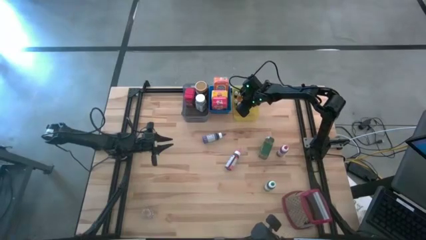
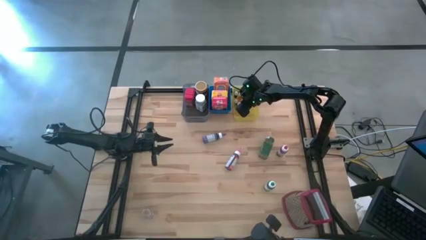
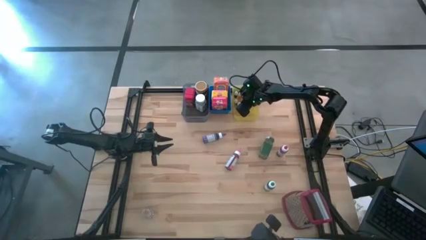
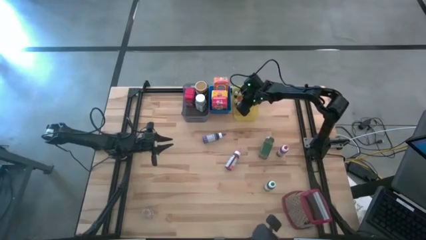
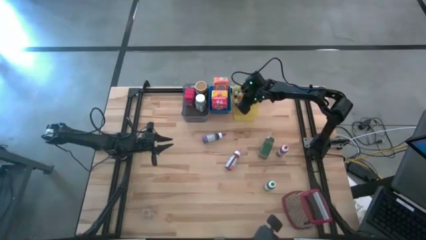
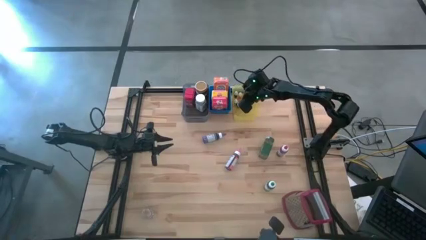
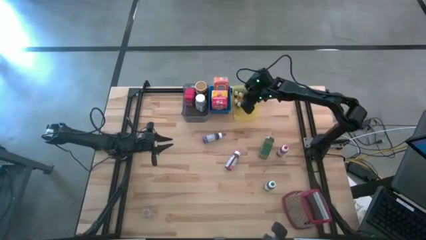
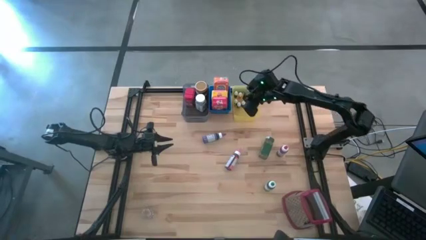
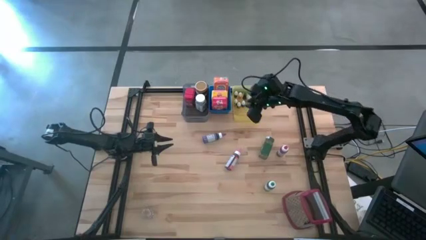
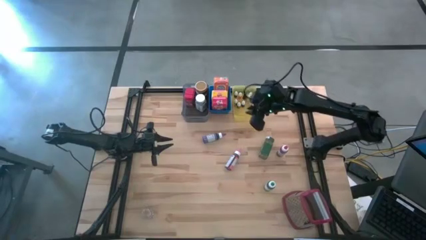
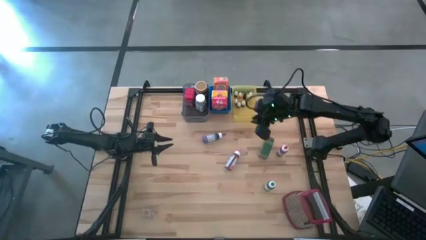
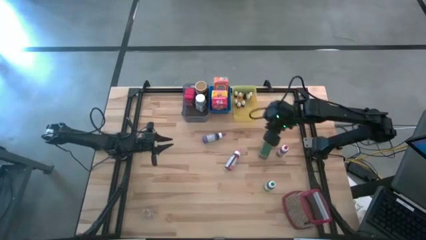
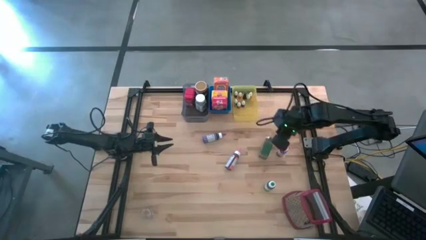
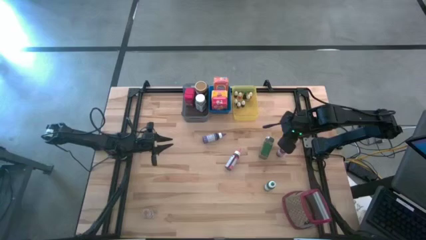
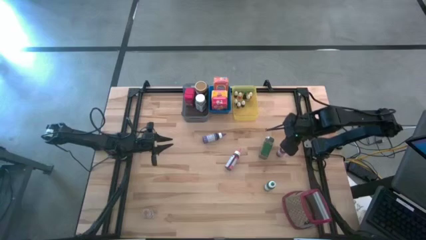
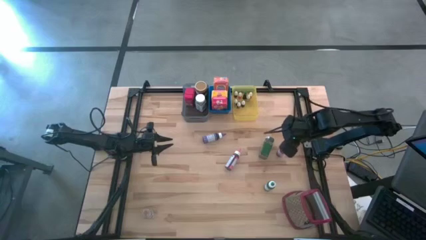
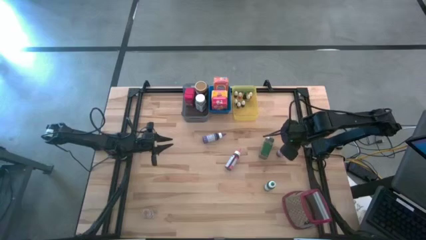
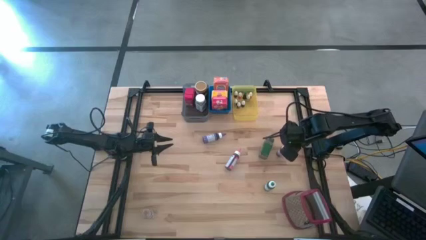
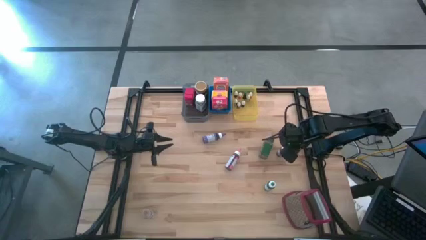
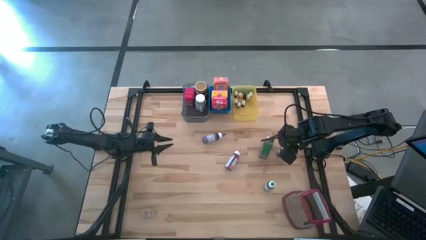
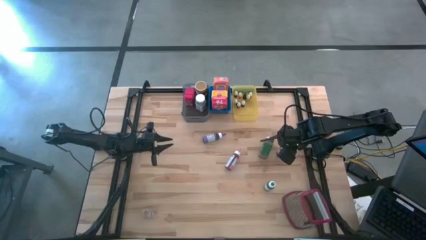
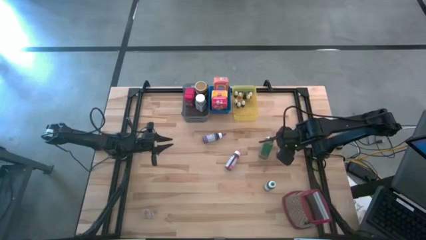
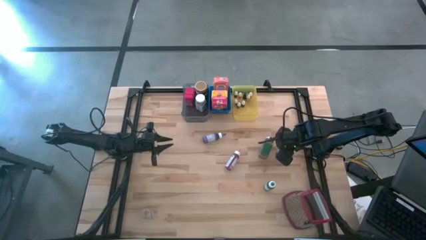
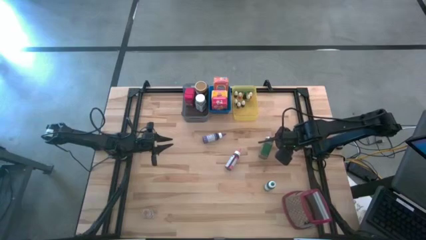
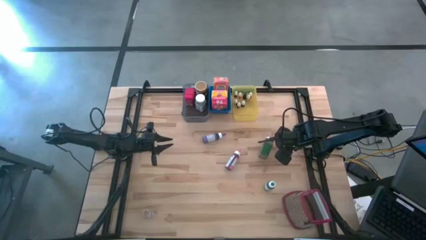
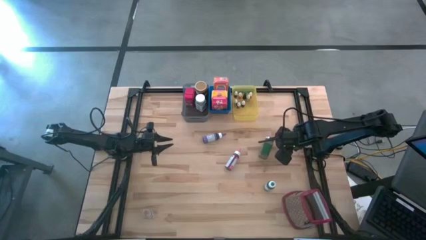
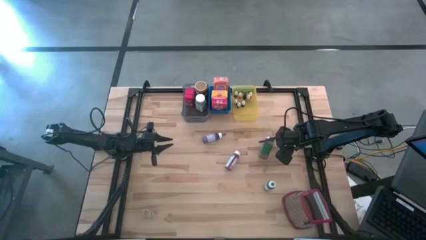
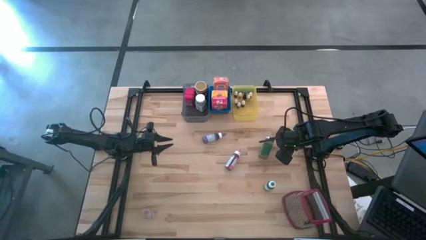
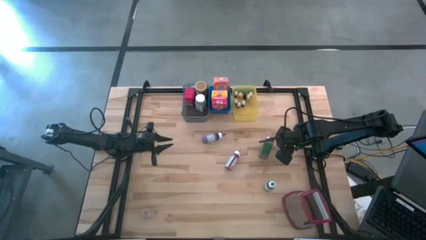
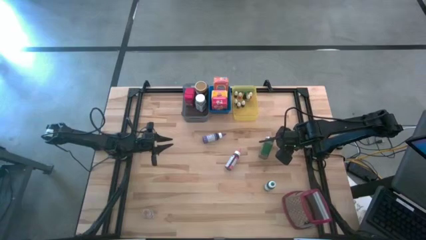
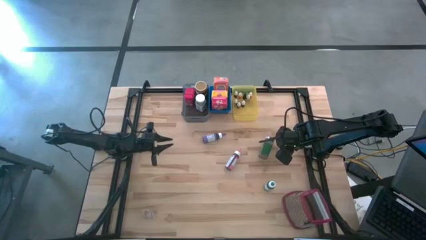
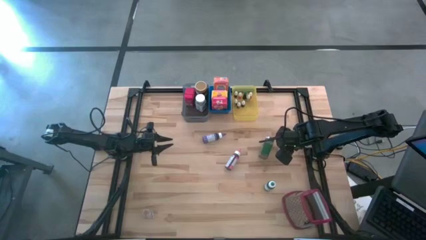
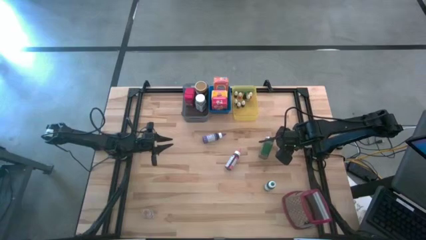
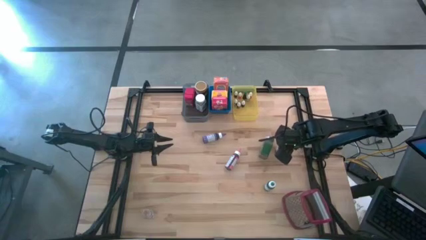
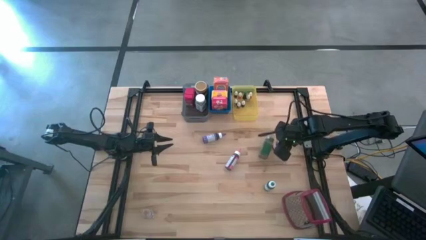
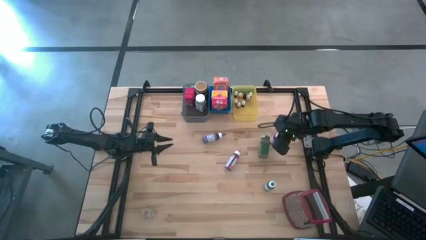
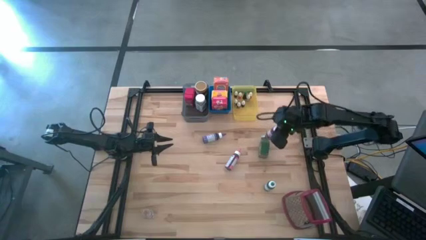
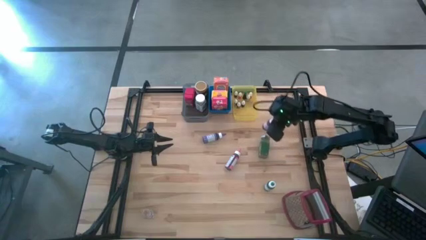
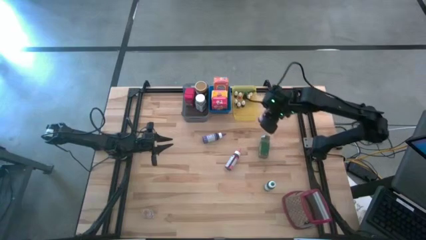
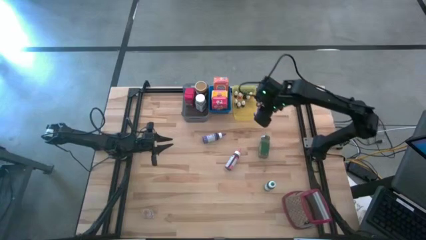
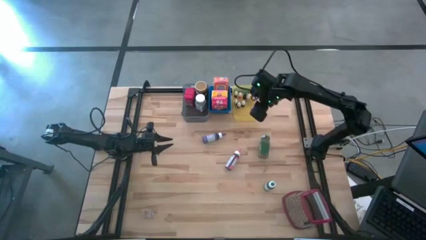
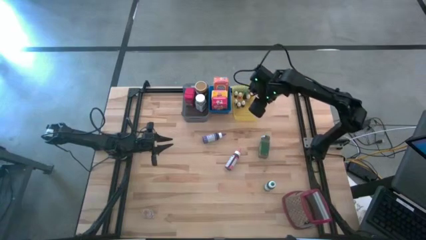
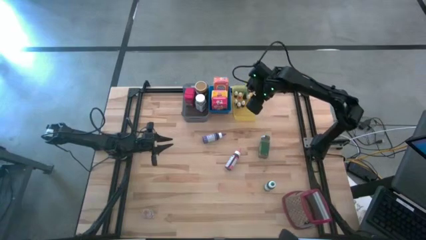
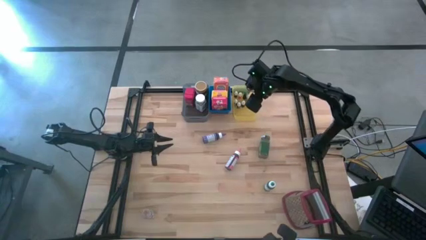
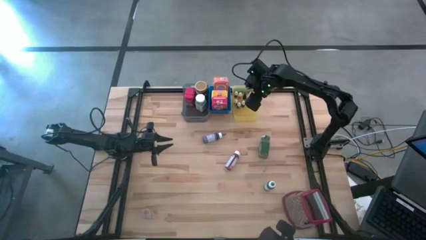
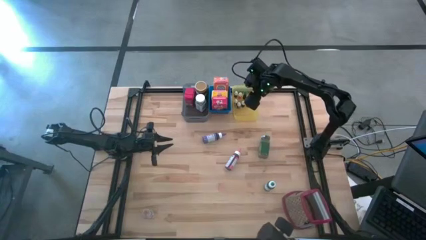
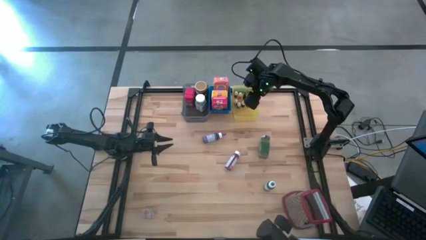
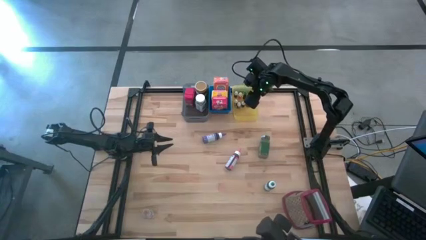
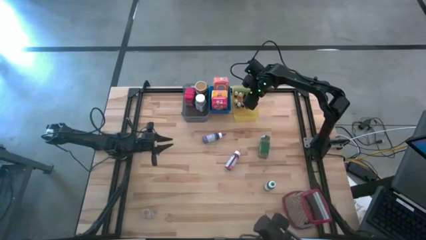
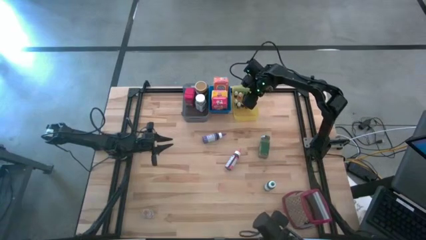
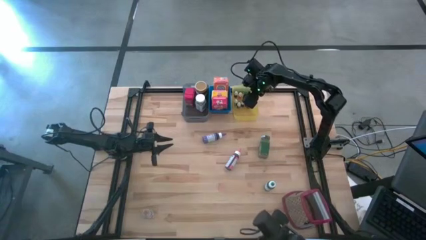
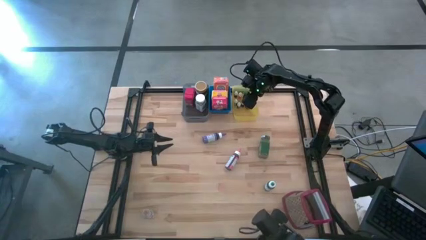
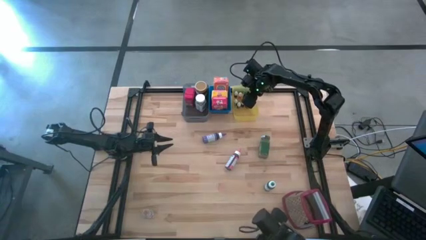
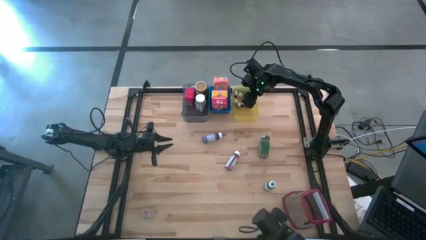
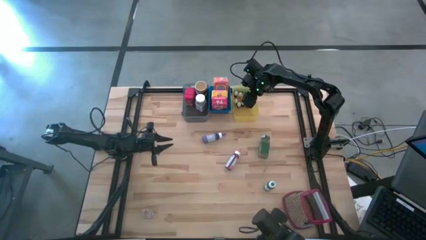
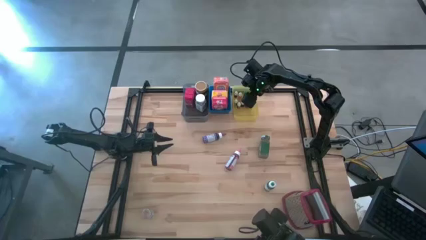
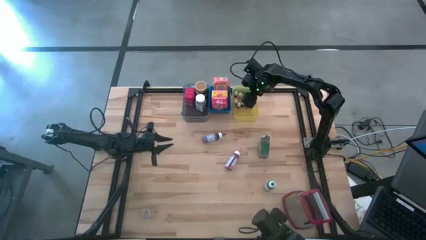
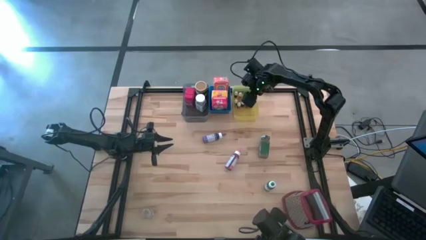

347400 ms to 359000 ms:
Task: Pick & Place Kitchen Items
Put the red food coloring bottle into the yellow bin

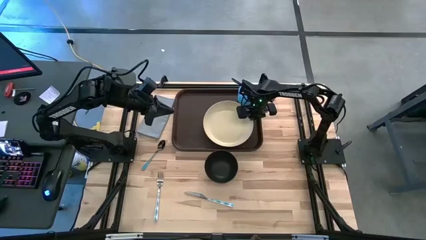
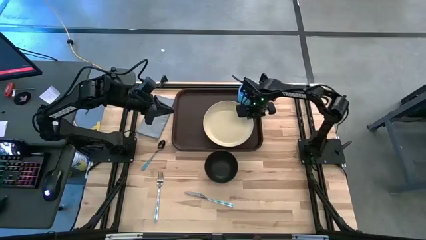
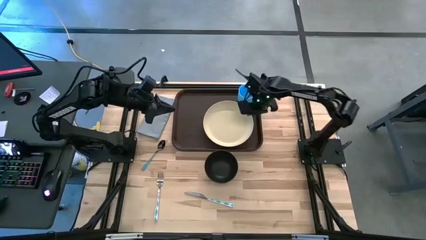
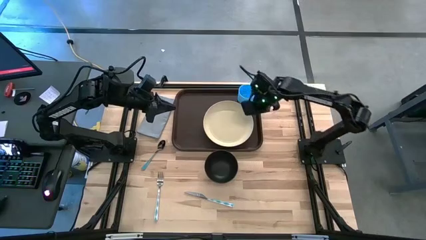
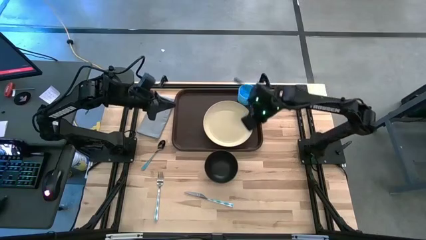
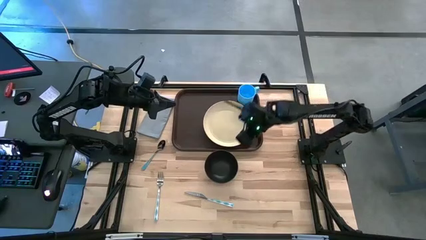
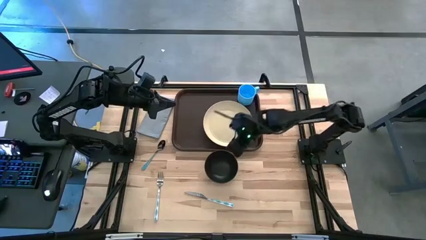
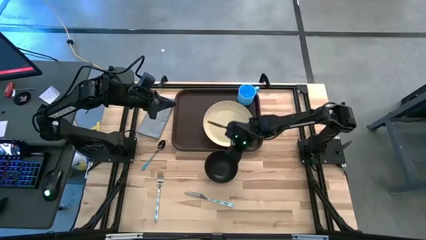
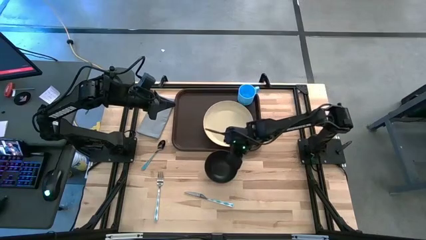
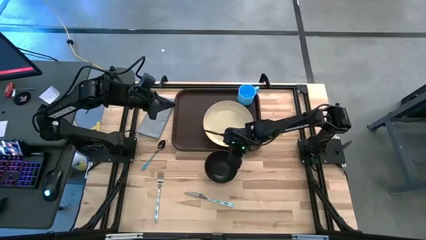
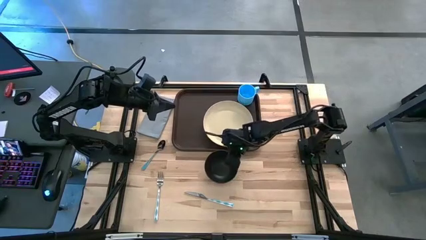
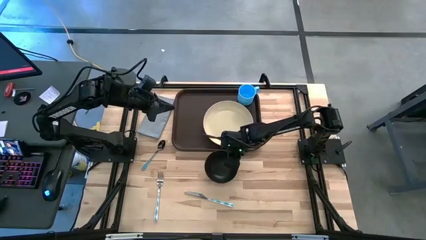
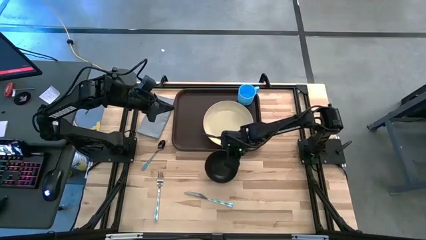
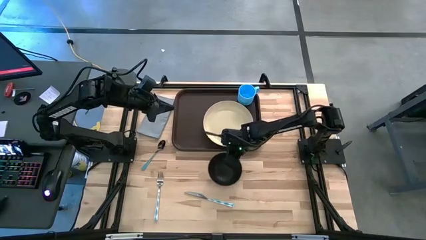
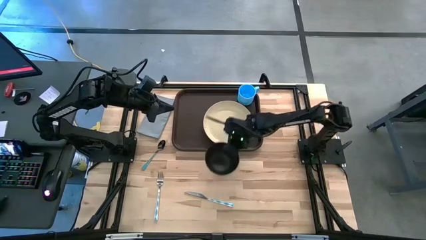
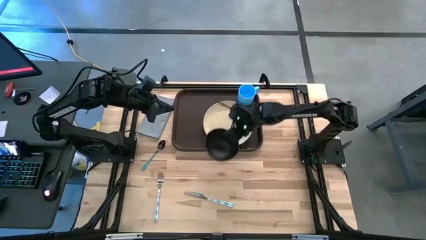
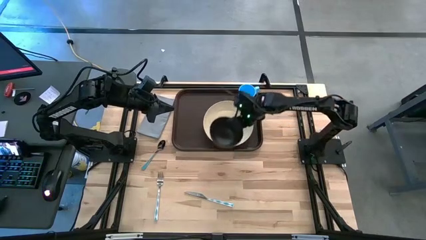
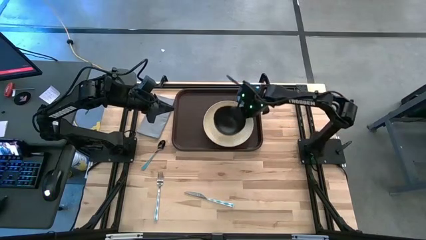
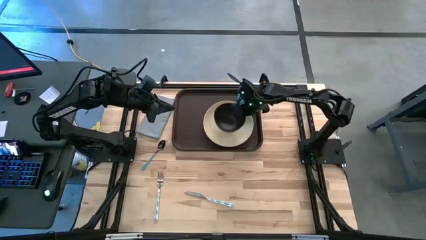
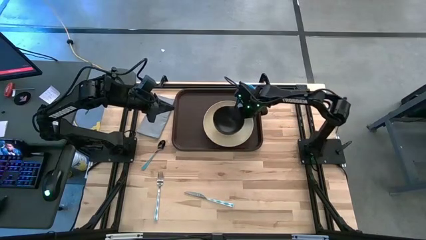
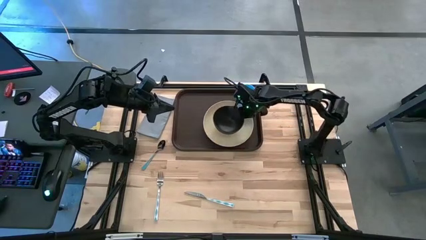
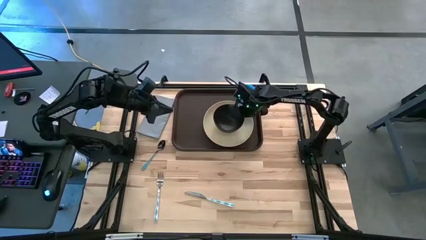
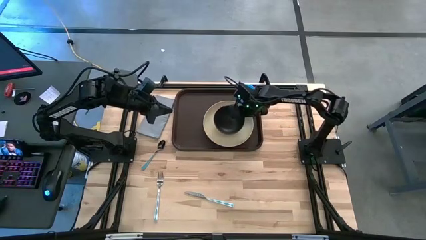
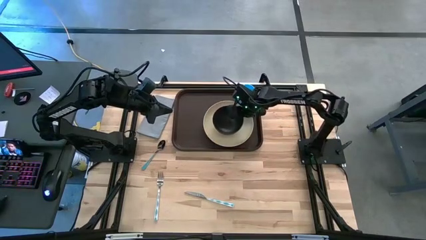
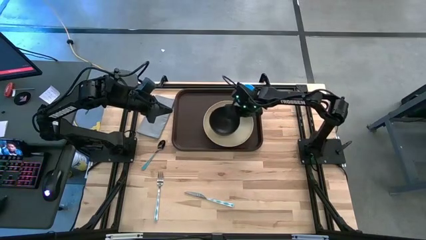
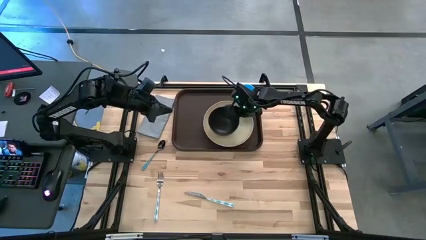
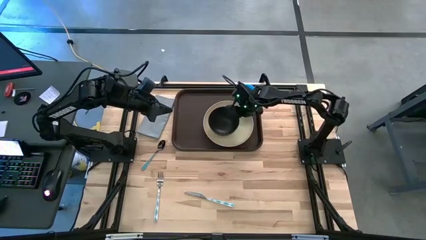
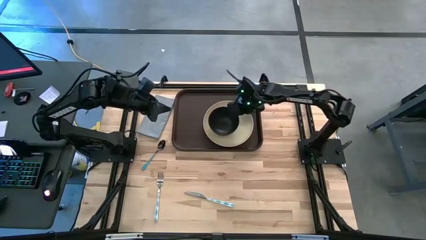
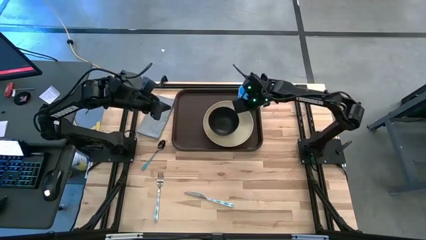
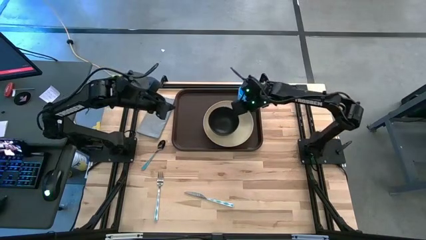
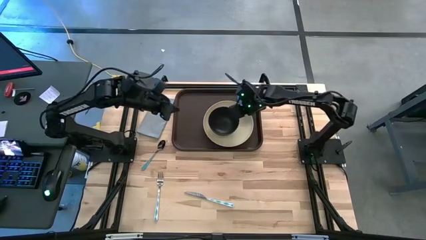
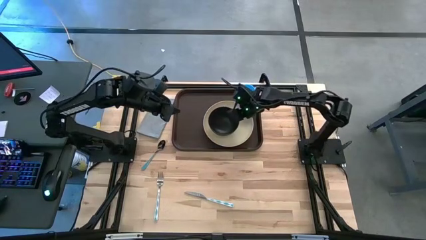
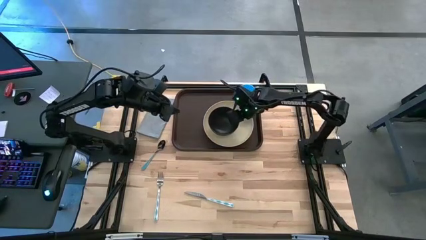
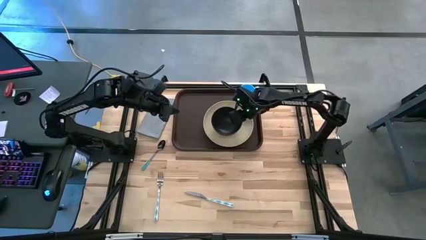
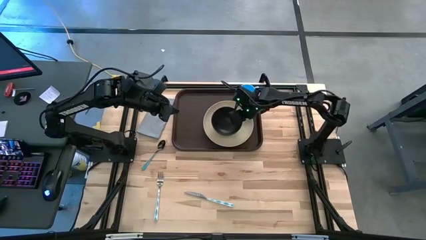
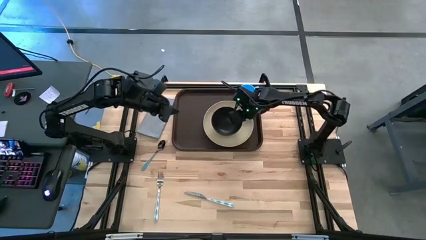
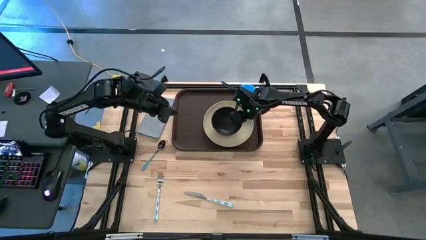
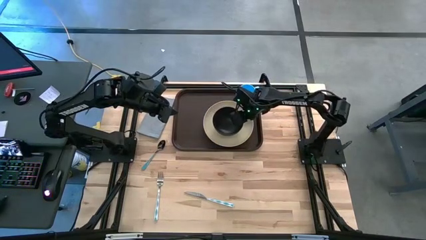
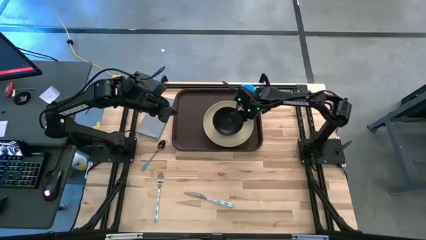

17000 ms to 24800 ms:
Task: Set up tray
Put the black bowl on the white plate
